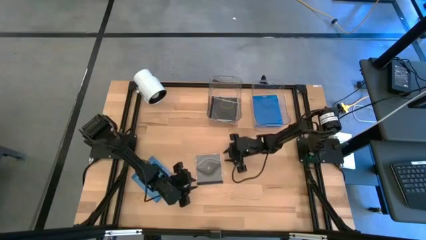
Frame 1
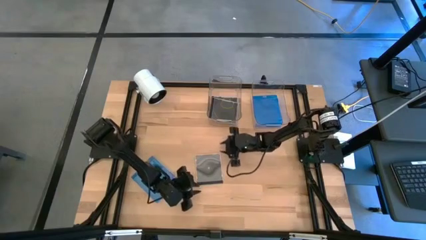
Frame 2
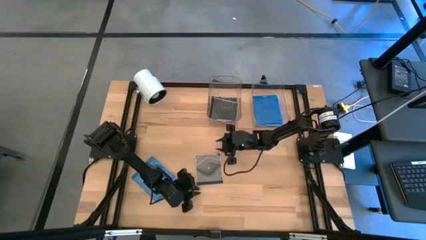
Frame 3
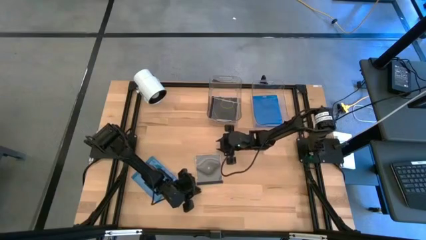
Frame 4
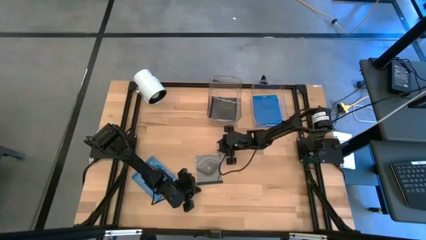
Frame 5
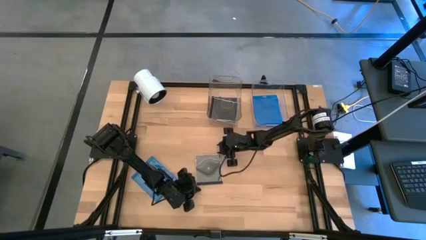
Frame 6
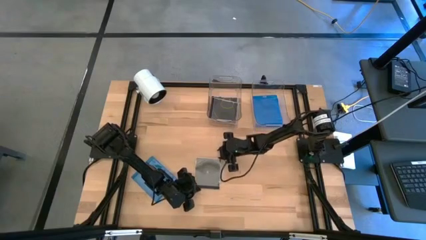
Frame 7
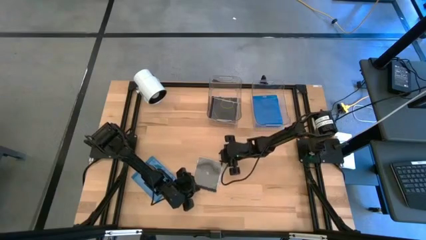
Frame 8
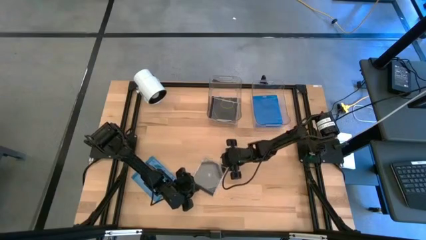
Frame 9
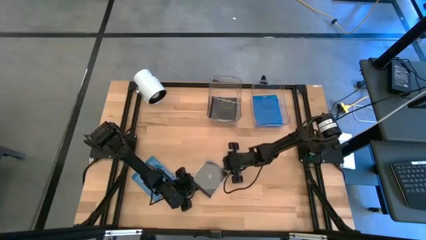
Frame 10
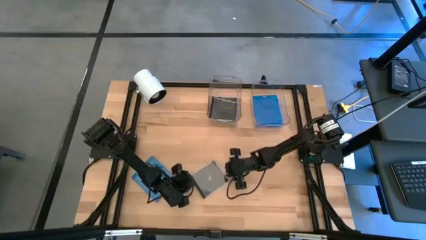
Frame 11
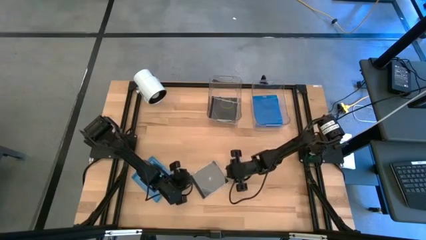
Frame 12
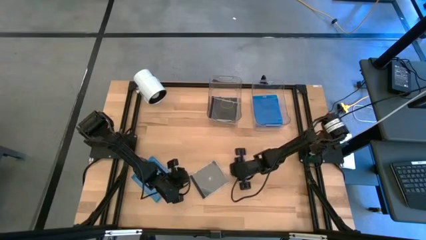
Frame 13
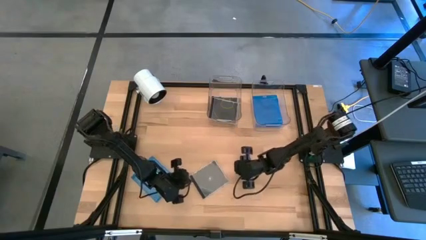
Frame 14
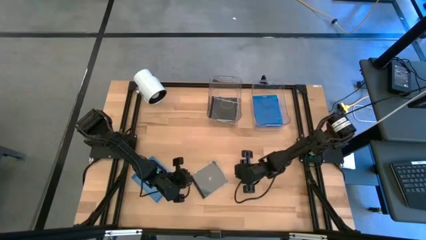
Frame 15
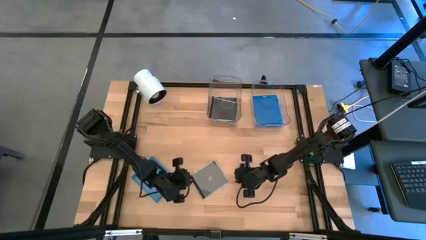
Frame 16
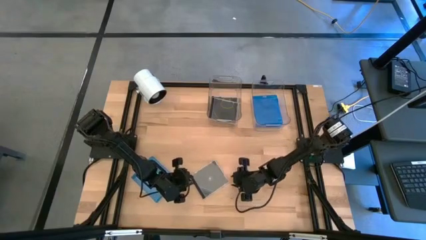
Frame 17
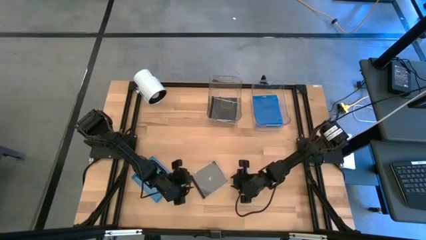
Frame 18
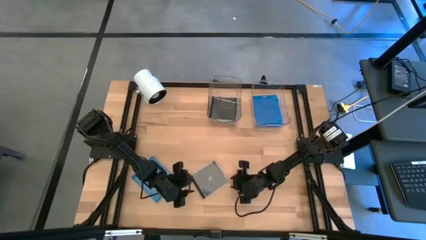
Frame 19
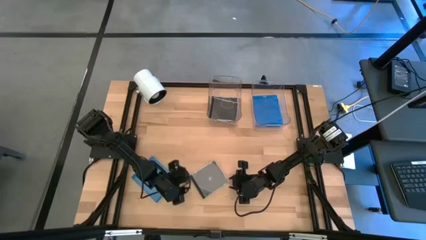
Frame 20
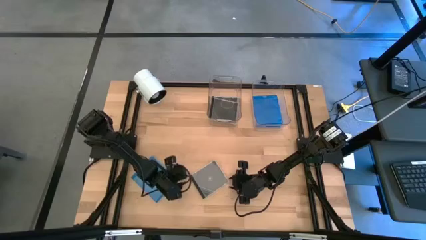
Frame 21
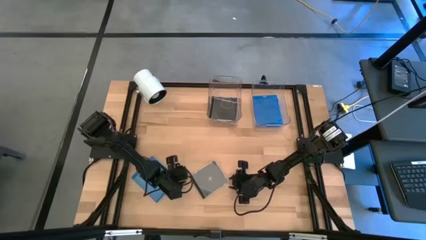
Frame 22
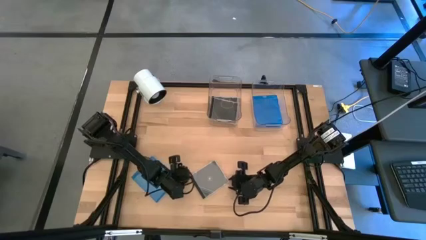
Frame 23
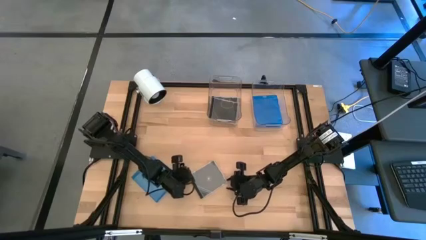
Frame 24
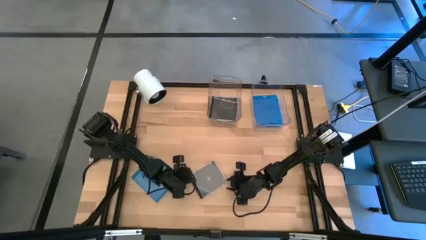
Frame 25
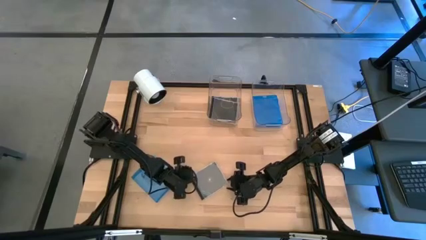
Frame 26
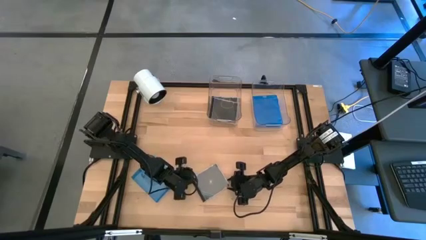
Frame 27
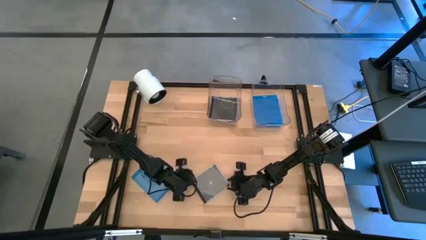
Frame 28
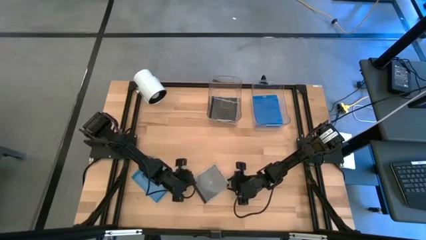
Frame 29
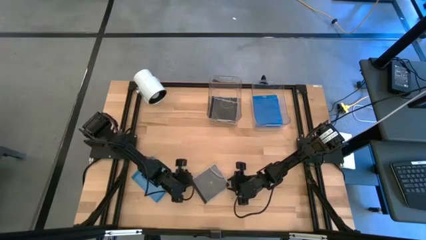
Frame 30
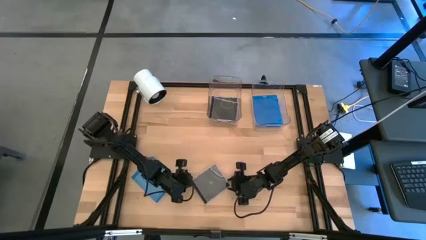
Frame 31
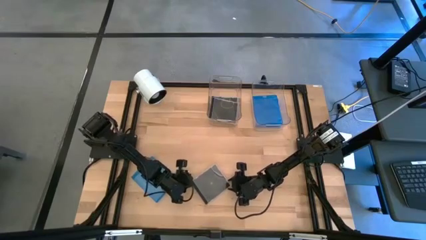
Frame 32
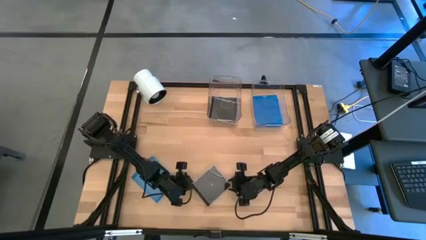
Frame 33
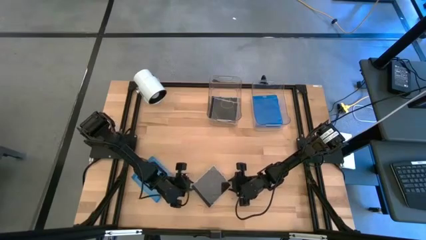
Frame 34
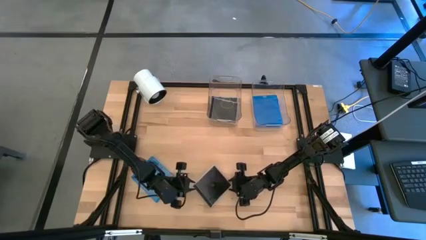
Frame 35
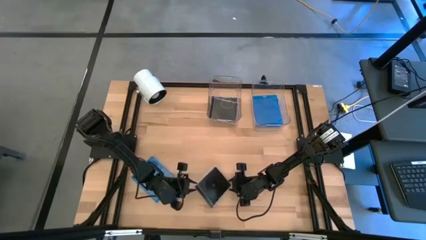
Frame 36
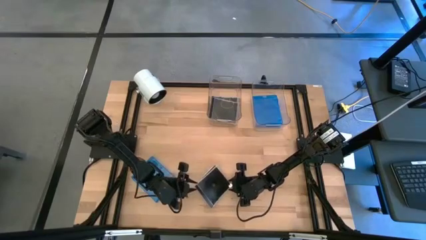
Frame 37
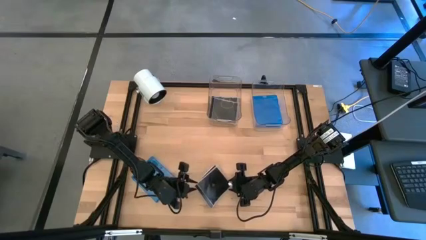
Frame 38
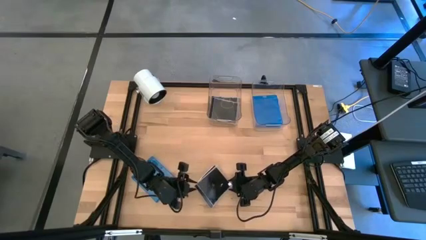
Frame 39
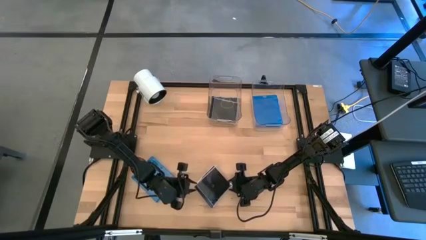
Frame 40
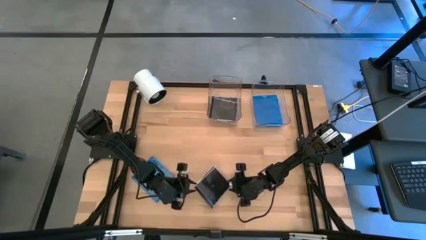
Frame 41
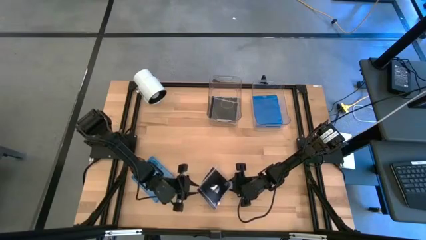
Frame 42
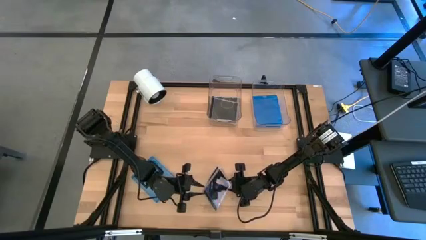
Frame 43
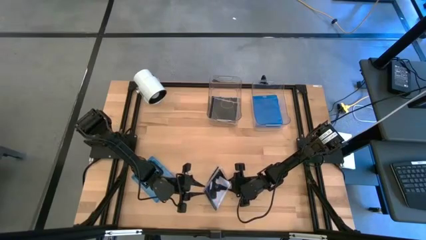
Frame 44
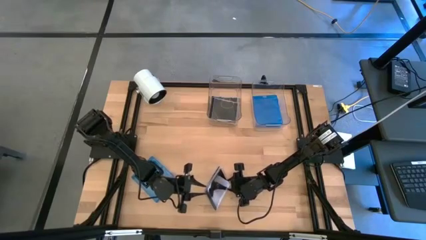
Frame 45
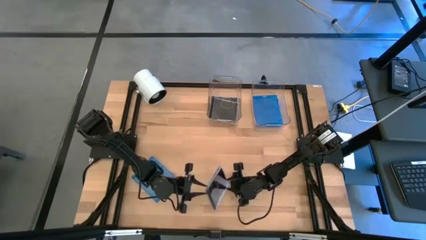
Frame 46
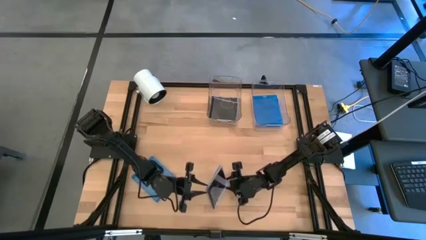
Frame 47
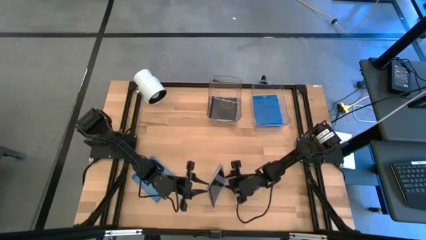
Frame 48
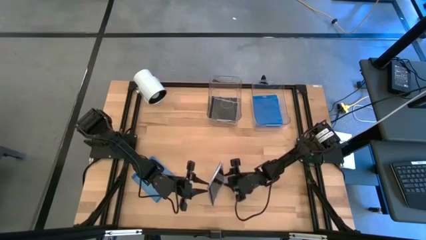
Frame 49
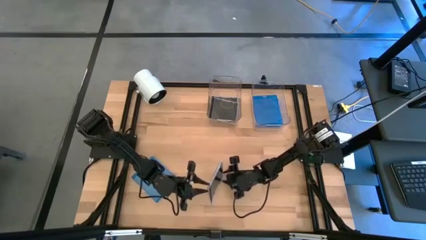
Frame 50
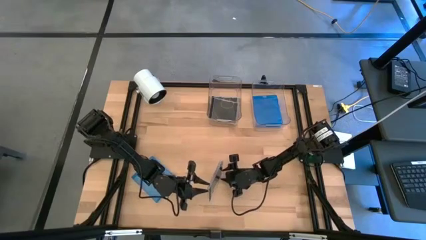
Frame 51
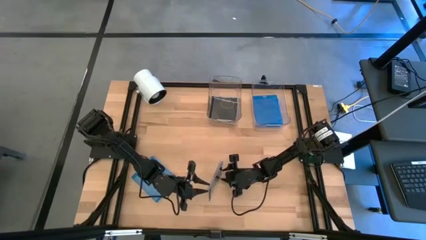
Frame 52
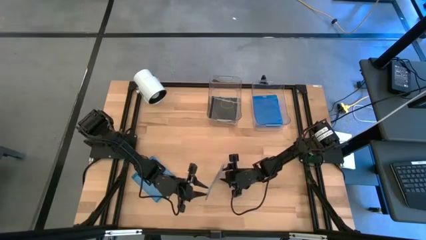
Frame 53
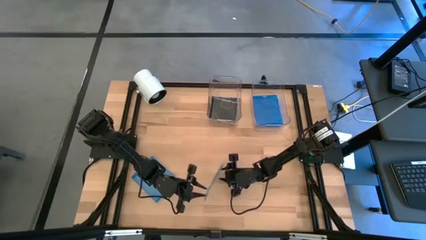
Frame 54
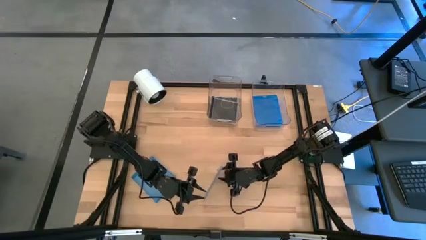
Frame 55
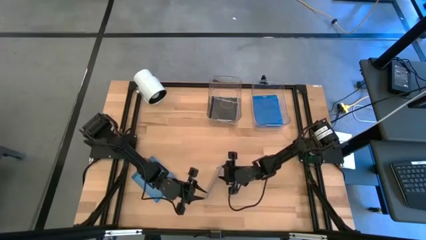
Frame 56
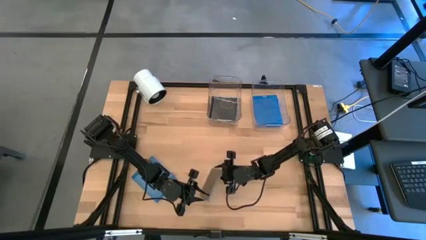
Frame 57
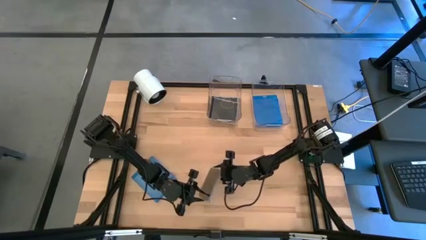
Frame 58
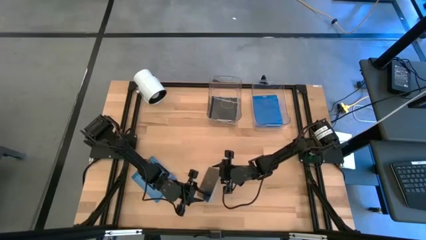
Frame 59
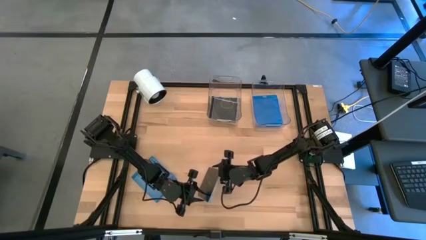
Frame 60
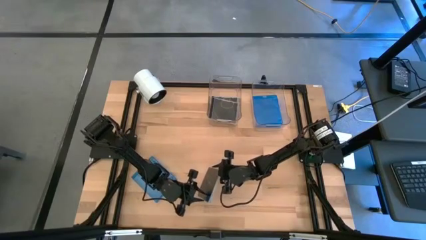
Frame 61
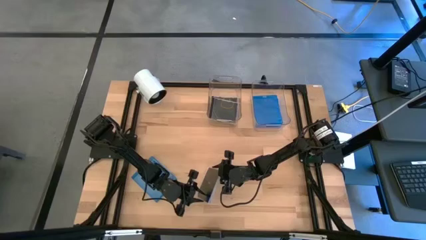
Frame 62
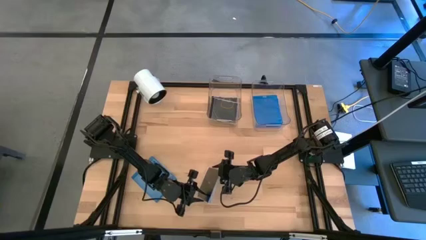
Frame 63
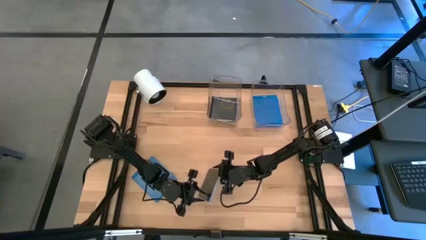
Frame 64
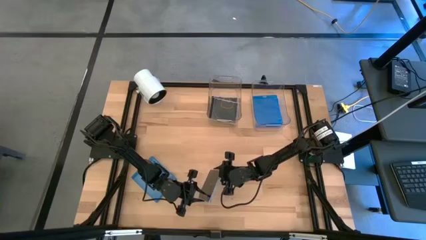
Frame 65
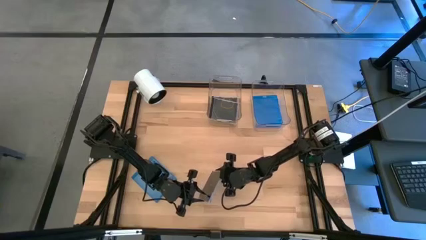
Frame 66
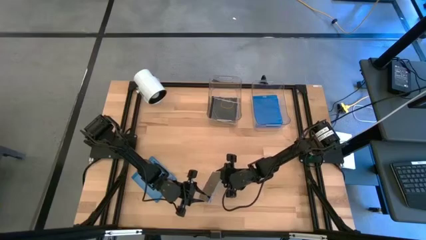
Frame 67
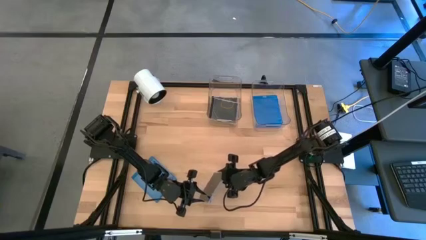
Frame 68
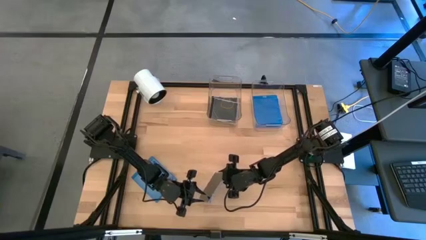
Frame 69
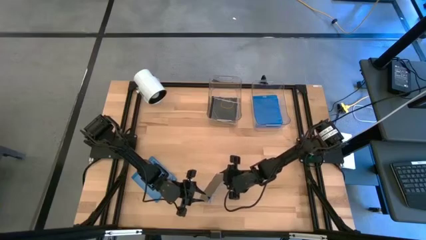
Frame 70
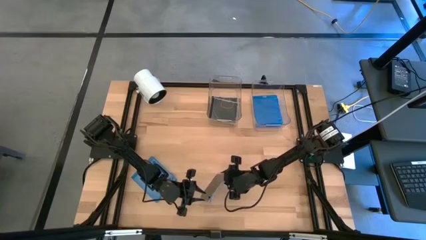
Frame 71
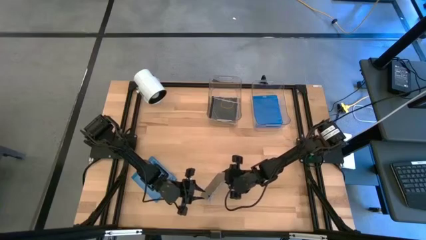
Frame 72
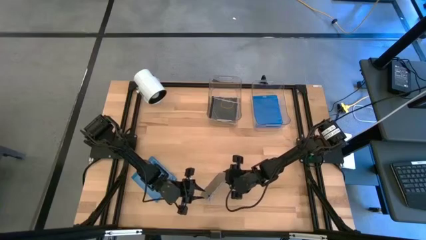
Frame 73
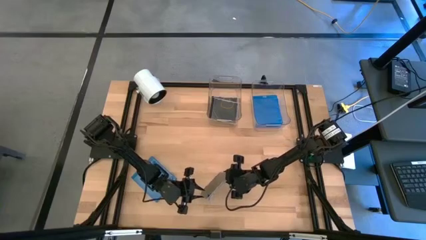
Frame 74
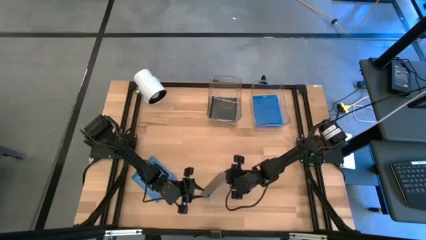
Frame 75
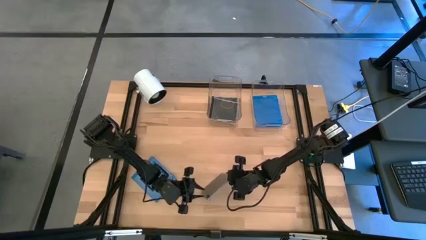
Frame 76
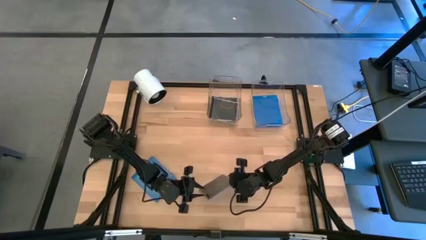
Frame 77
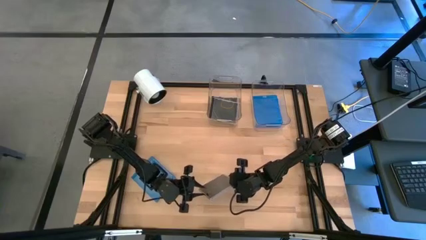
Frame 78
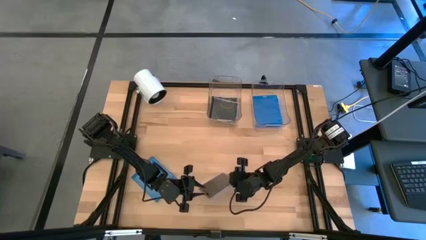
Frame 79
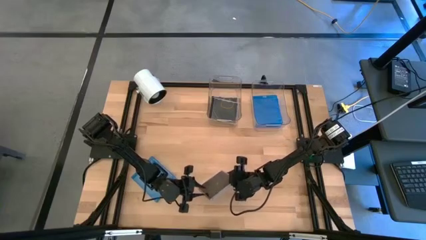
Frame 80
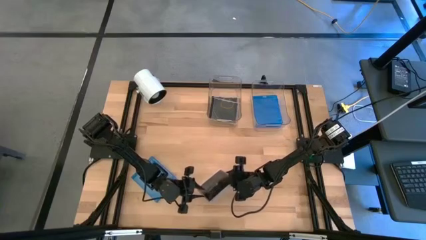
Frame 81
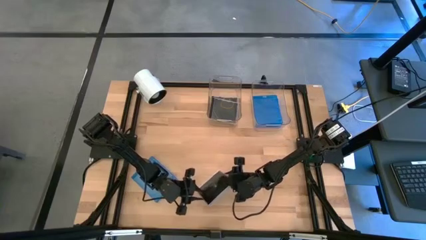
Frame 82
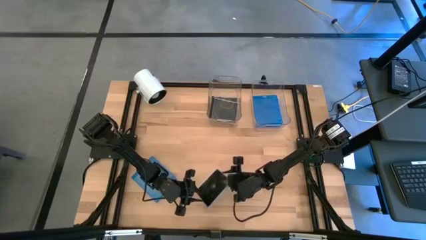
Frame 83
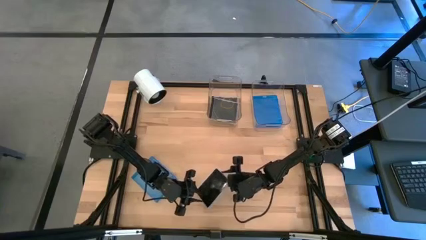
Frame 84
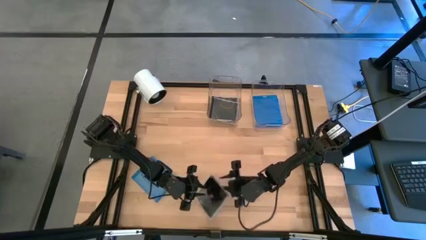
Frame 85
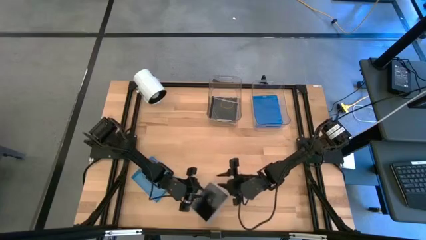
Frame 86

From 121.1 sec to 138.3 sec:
Task: Pick & place jewel cases by type
Put the black CD case into the left transparent bin
